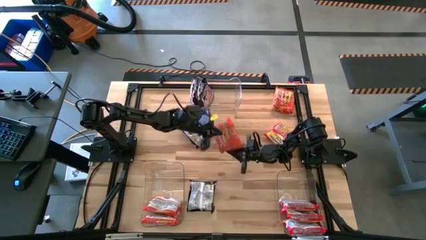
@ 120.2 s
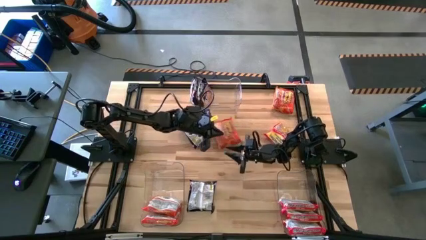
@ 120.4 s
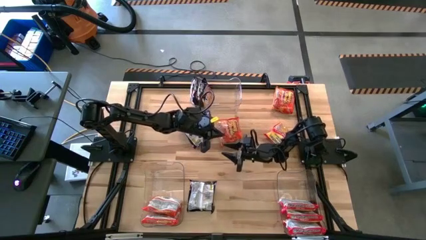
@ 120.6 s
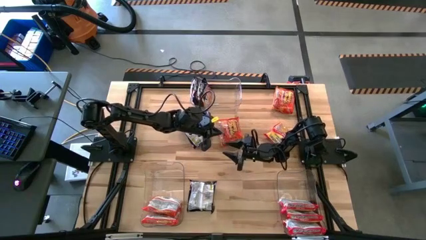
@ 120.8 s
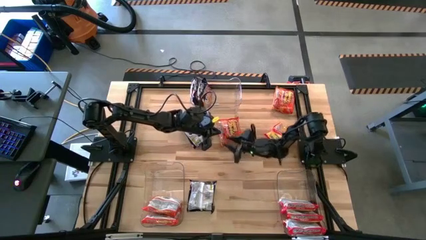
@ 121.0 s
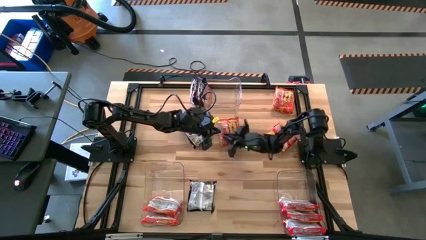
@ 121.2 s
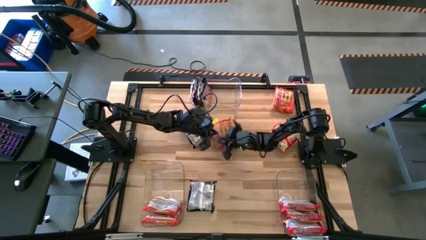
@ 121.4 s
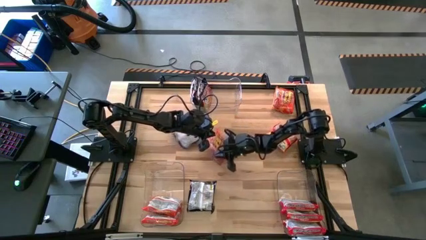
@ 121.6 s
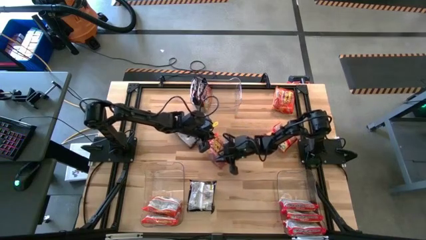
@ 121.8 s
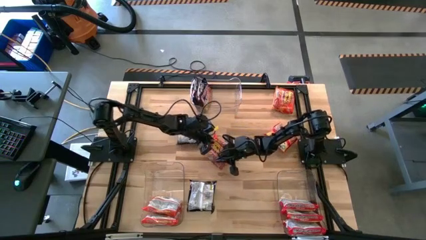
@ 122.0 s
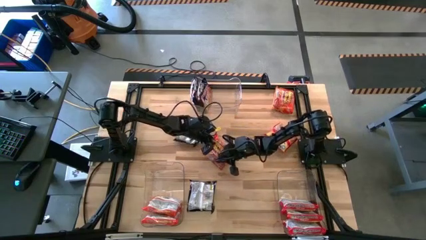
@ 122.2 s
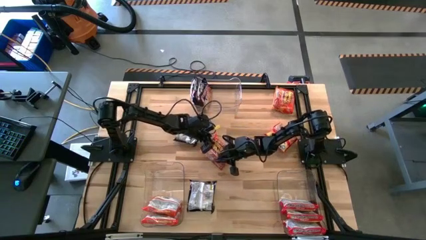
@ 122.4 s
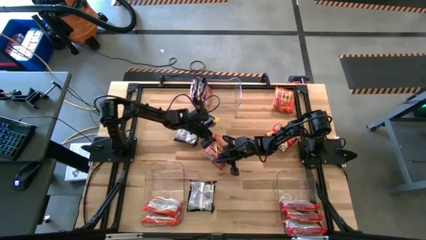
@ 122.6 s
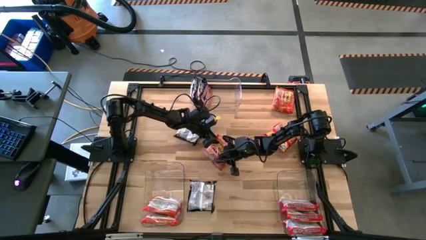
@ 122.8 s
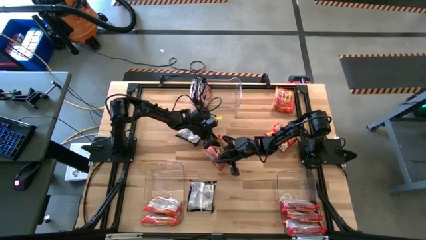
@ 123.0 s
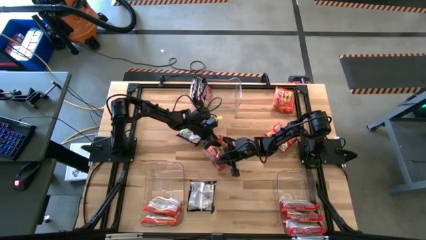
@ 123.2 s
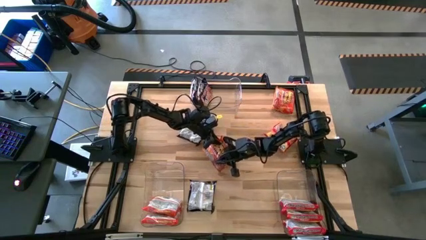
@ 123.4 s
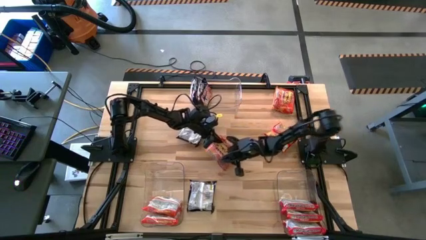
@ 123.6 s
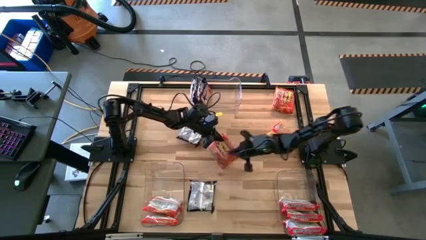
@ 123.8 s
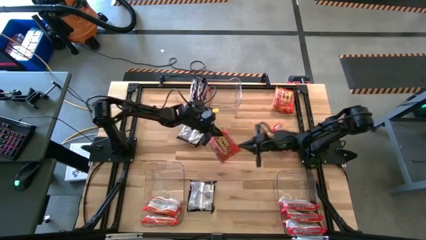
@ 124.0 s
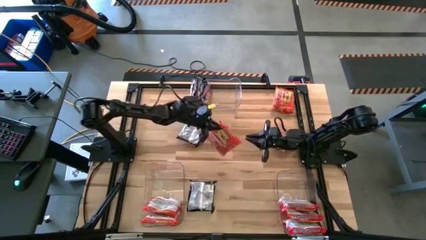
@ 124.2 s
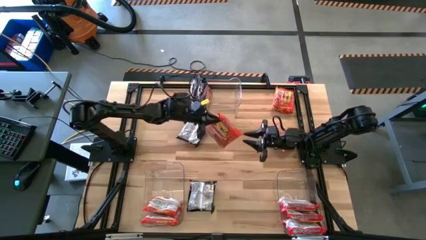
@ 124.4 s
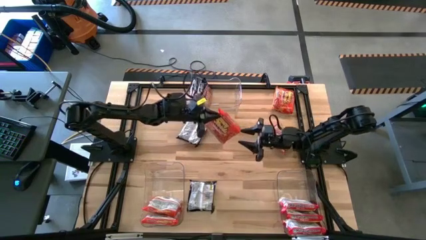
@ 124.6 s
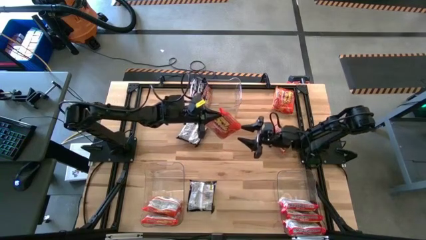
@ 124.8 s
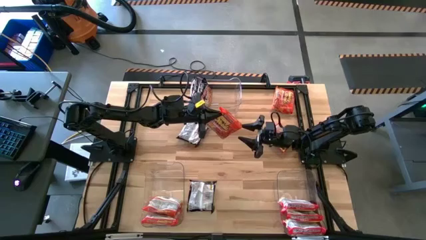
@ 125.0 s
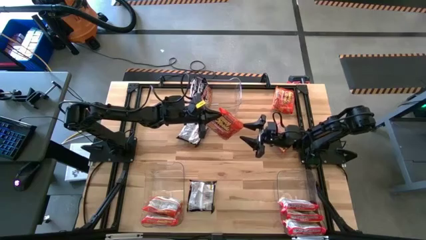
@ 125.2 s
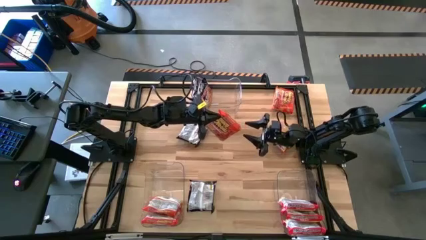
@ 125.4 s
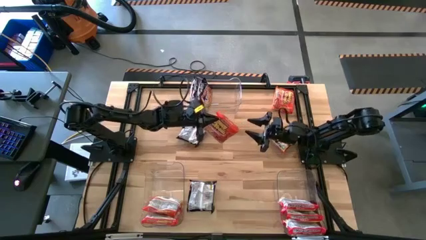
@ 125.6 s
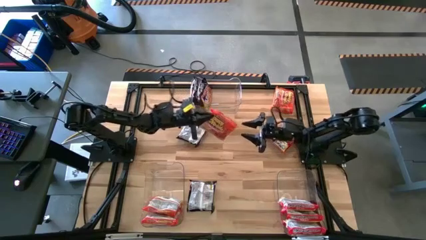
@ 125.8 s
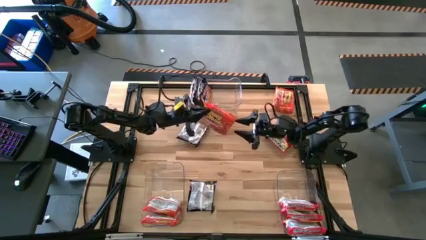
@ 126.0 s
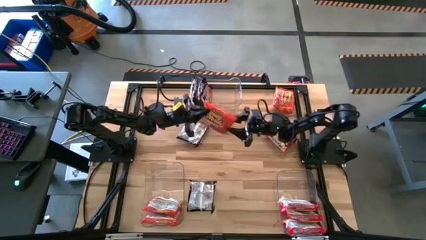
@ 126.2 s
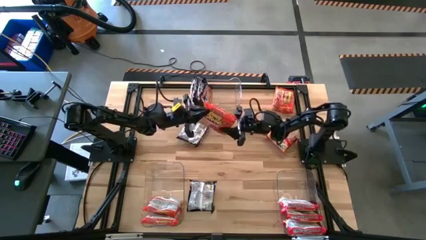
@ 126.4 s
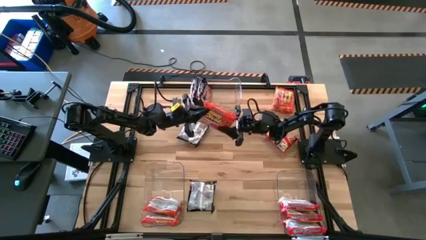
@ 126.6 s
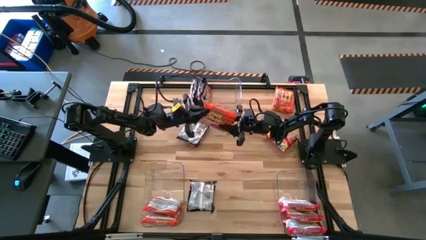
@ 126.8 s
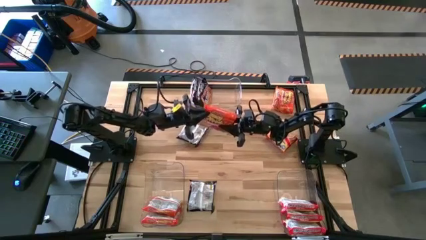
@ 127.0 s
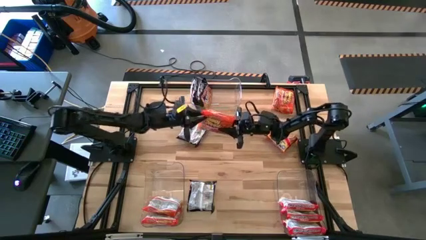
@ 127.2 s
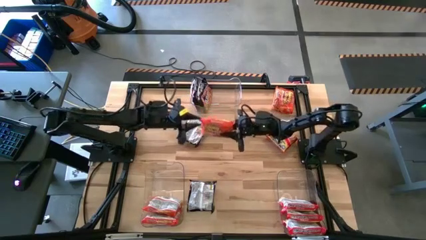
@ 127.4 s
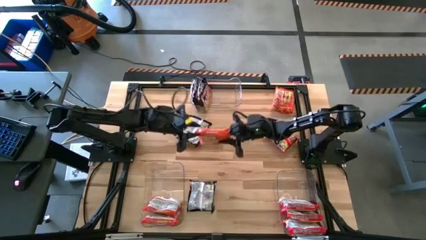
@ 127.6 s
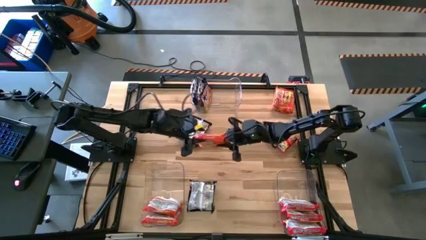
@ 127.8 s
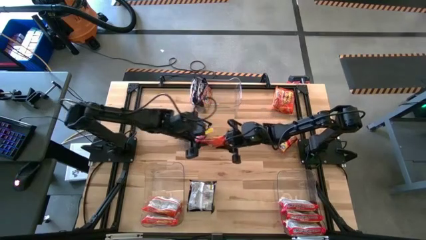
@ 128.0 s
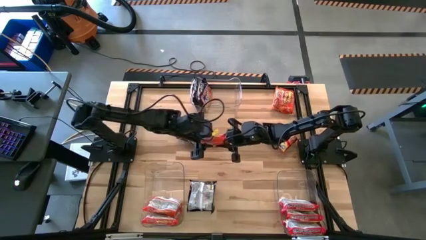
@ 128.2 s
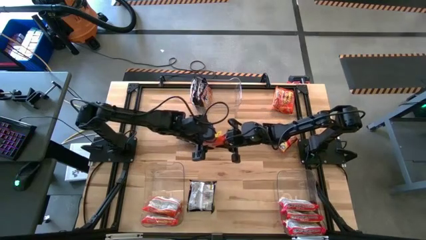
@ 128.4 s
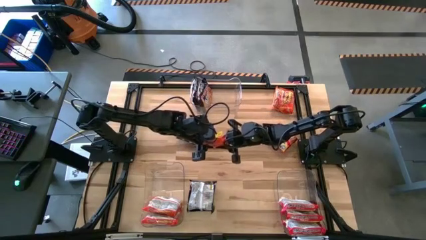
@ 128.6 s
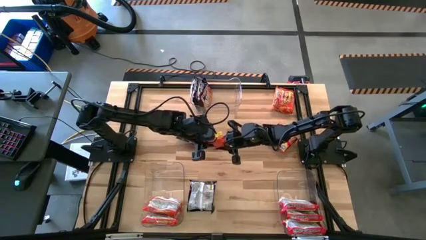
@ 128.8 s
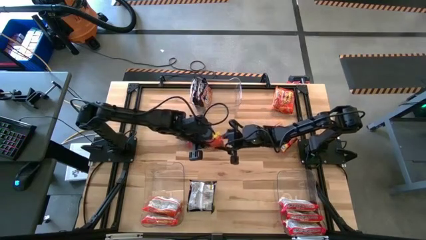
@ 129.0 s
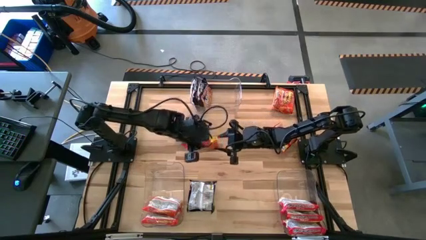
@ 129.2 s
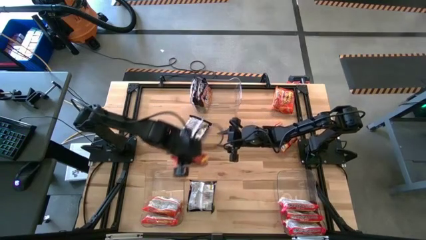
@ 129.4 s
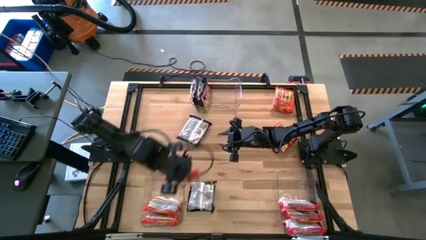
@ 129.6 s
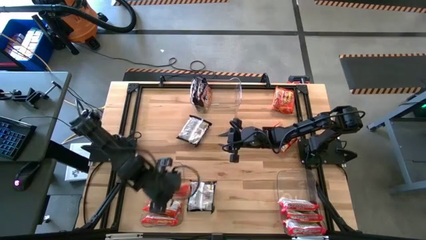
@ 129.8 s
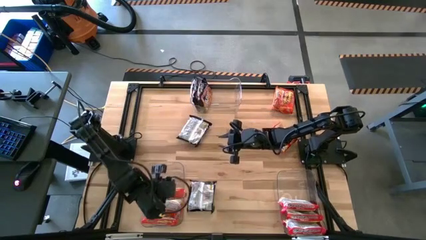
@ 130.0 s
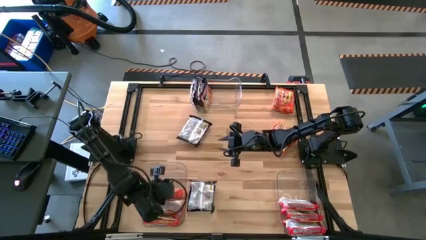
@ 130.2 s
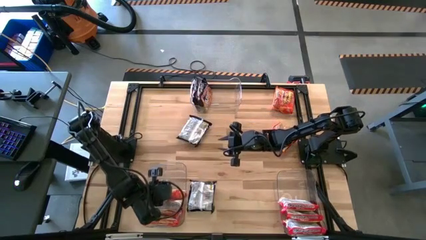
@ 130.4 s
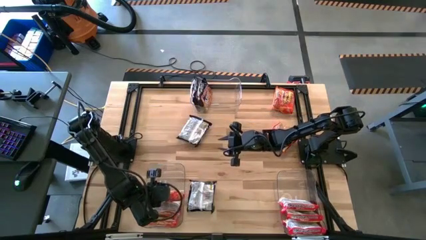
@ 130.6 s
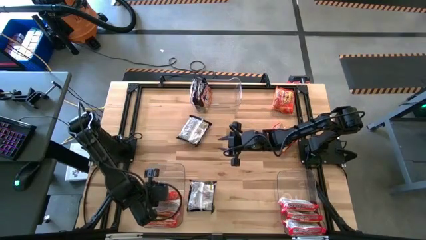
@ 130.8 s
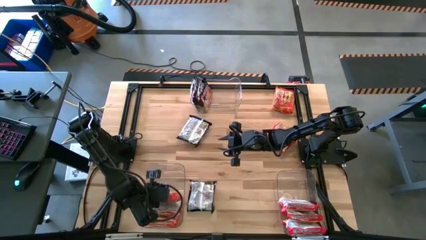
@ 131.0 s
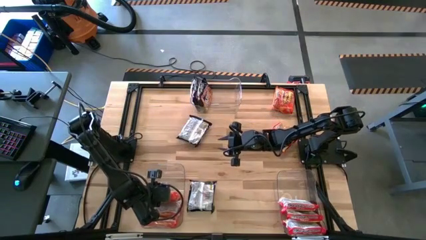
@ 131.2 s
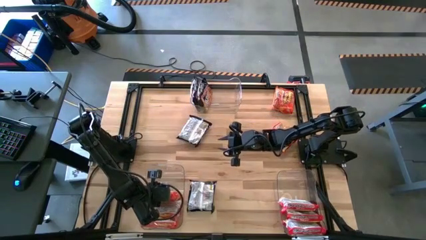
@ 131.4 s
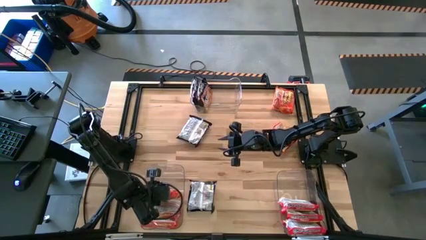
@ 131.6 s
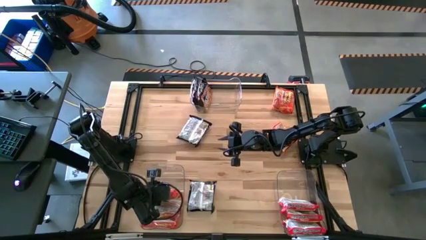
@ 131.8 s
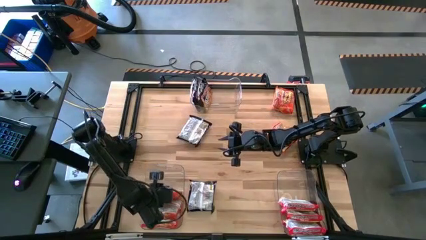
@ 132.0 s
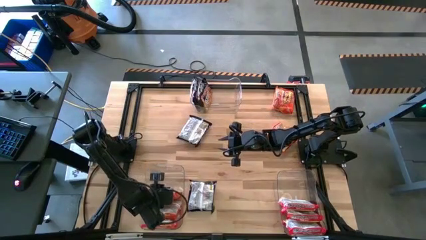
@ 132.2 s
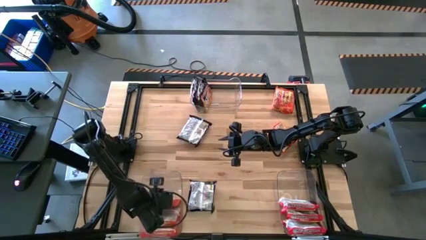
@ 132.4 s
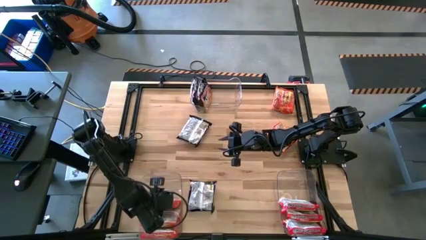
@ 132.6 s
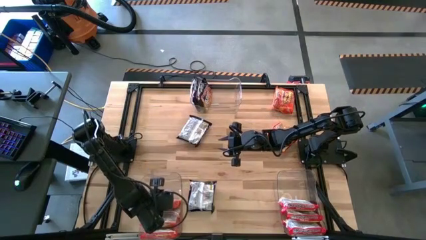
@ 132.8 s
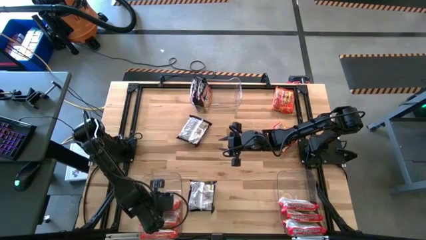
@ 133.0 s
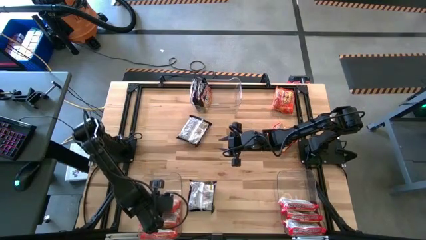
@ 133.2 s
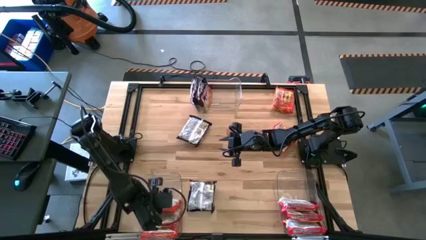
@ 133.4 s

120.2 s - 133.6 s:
Task: Sort Maruchan noodles
Put the bottom orange noodle pack into the bottom left transparent bin

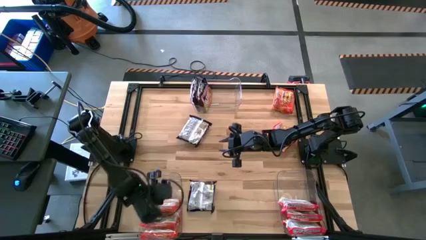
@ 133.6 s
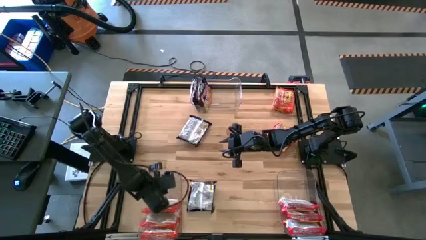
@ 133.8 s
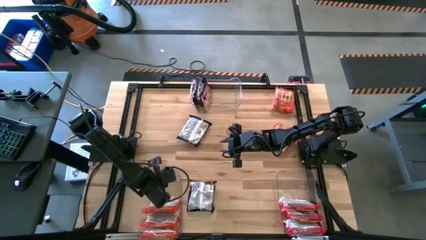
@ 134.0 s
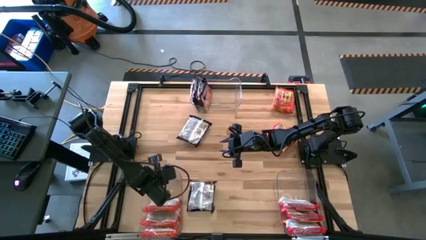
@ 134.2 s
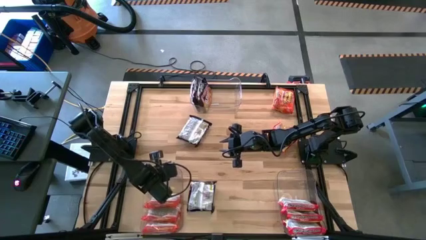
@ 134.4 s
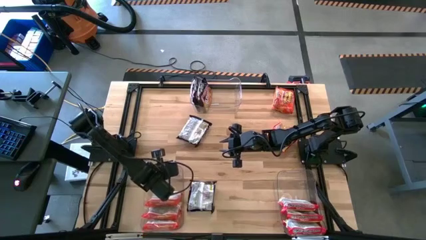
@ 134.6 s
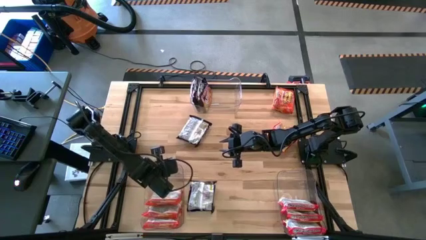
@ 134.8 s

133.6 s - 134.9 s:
Adjust the bottom left transparent bin
